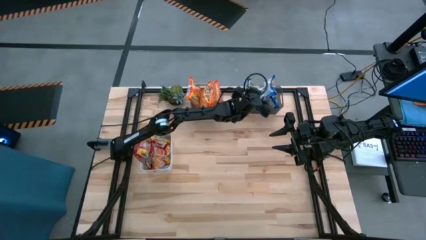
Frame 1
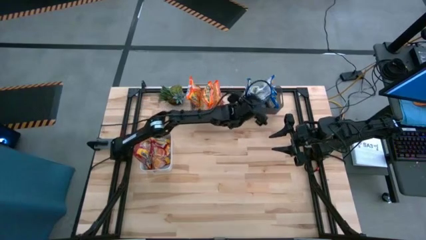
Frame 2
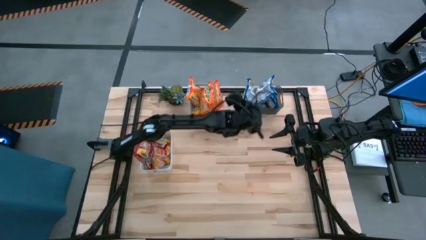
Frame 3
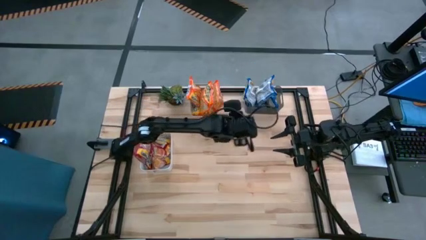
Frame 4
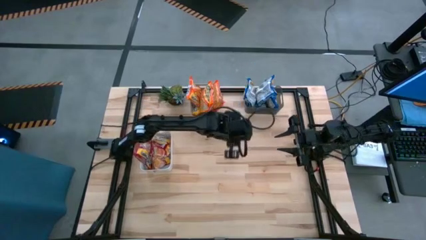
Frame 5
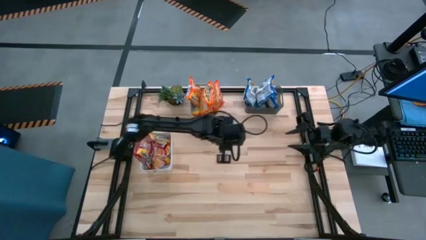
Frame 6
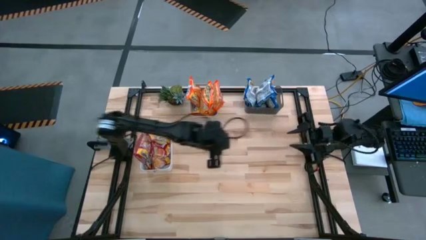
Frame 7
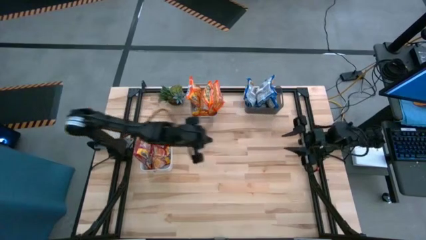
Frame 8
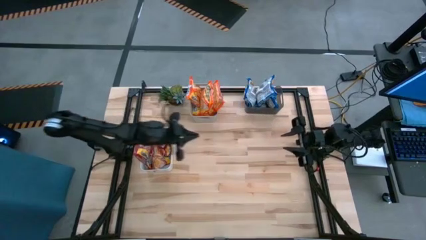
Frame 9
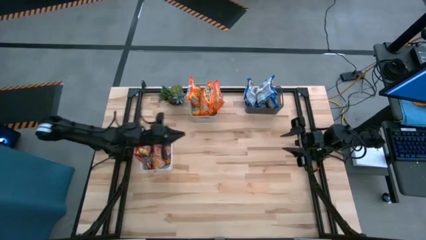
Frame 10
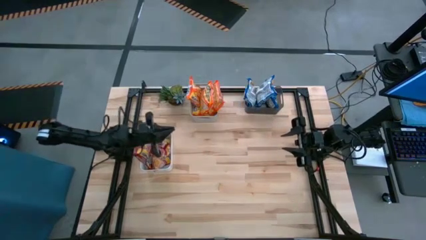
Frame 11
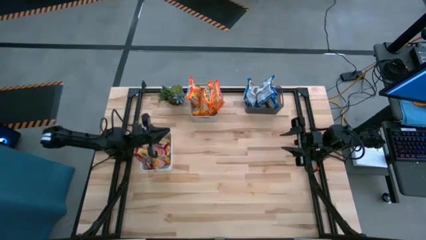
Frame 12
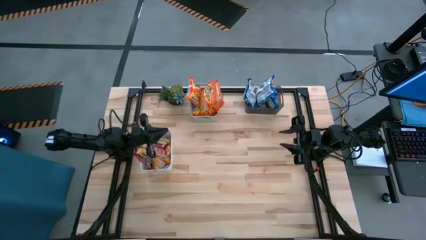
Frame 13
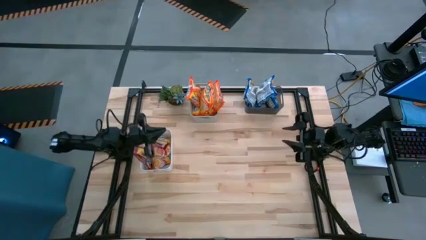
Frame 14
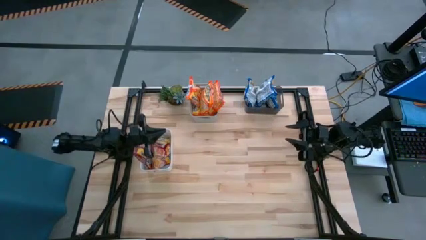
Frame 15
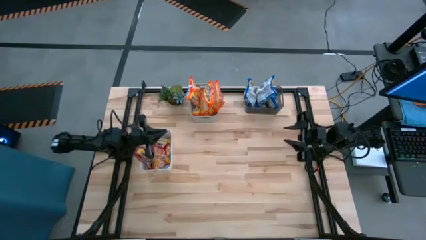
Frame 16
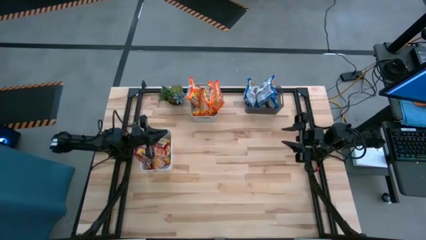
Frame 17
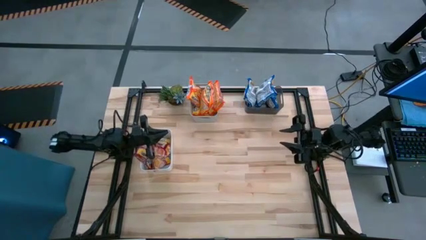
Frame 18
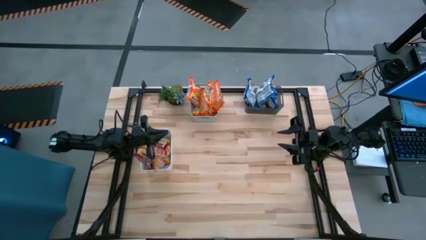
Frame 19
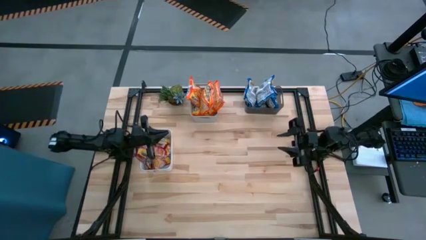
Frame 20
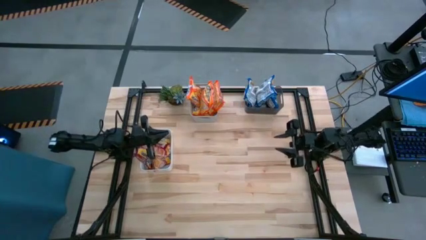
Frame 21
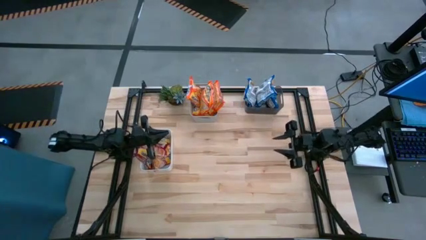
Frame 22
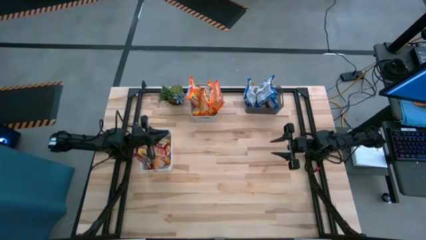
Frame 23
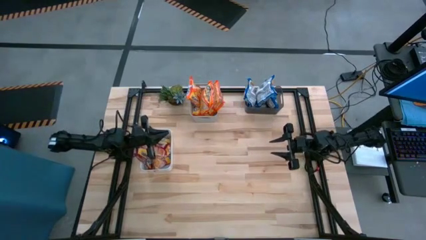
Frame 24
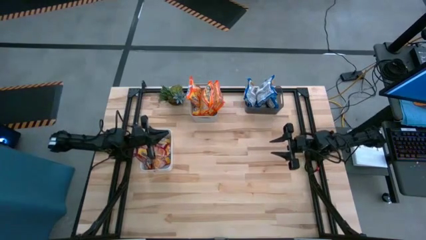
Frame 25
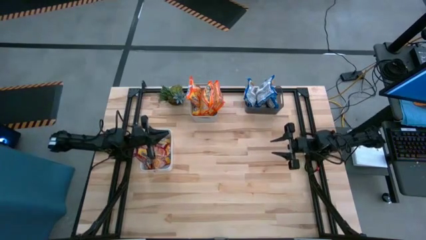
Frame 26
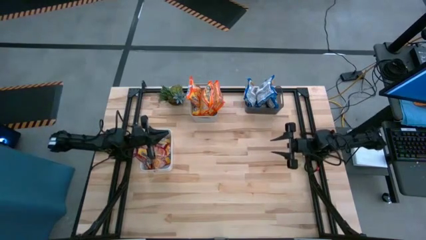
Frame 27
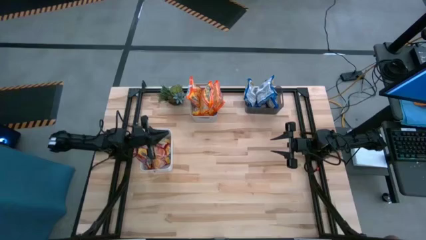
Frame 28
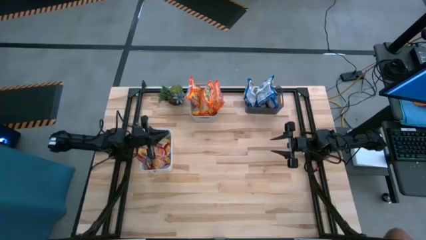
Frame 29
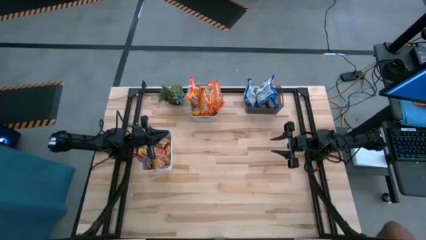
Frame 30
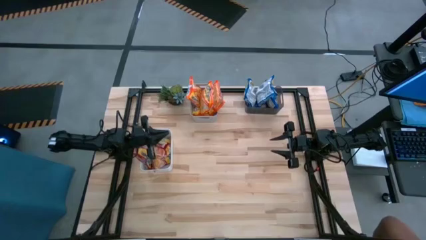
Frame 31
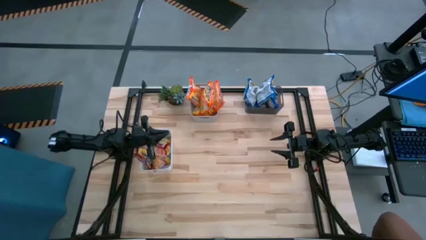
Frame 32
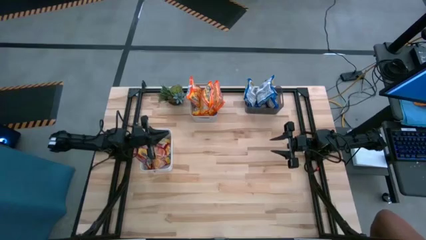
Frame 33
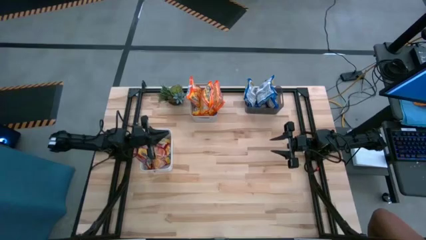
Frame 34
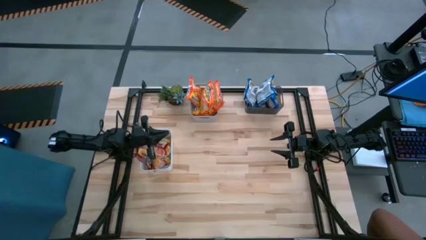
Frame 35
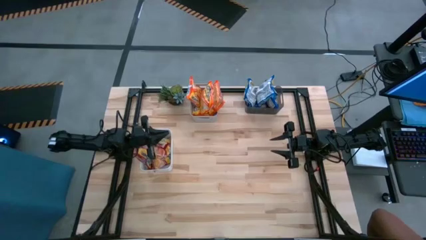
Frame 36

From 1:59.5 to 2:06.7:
Task: Sort Maruchan noodles
Return to Home Position

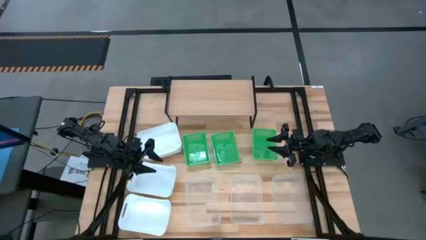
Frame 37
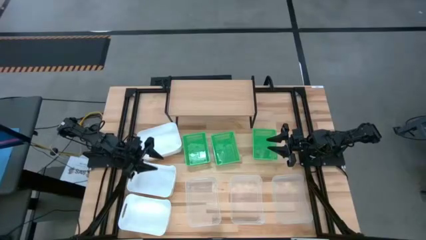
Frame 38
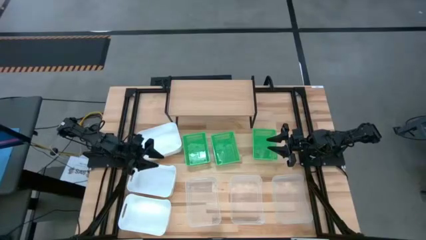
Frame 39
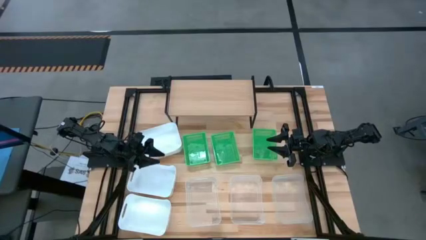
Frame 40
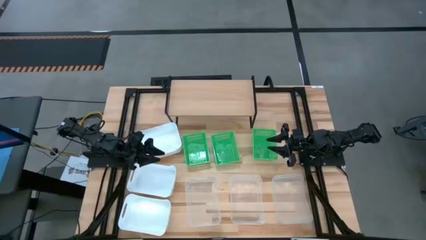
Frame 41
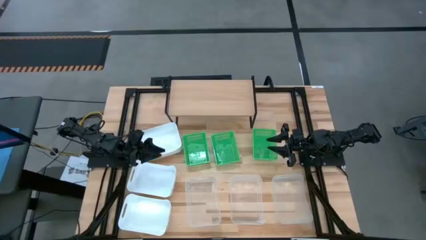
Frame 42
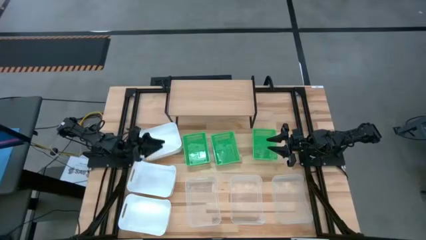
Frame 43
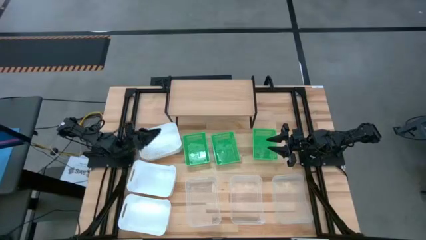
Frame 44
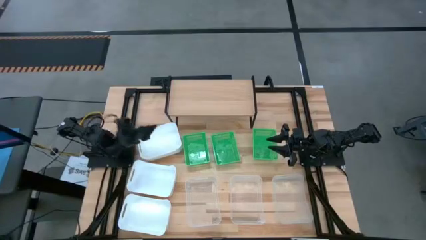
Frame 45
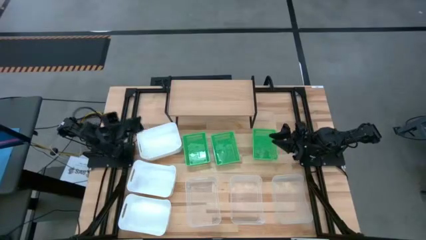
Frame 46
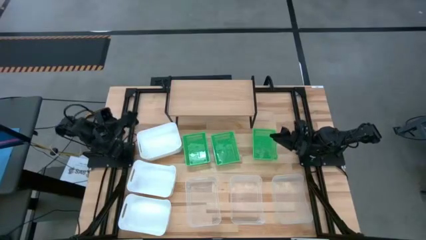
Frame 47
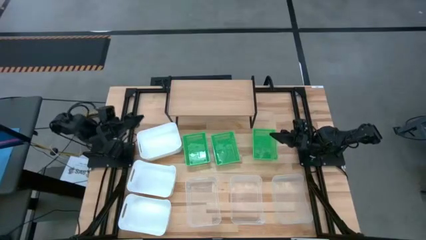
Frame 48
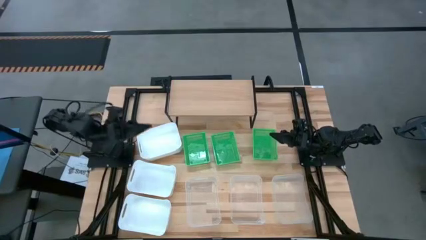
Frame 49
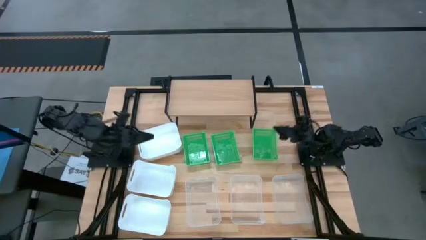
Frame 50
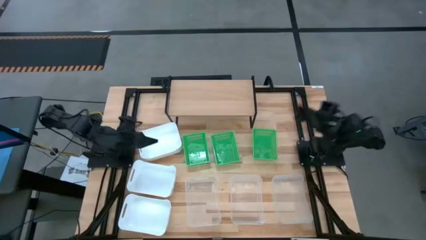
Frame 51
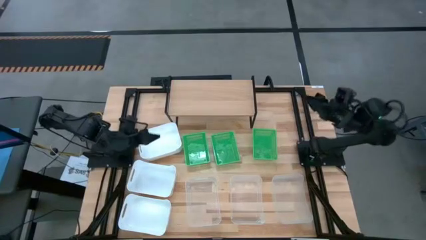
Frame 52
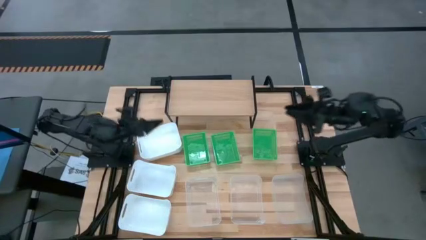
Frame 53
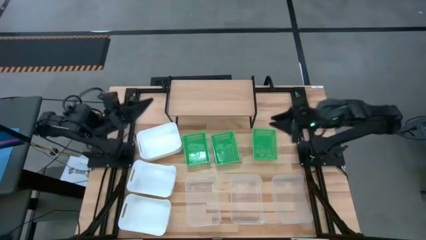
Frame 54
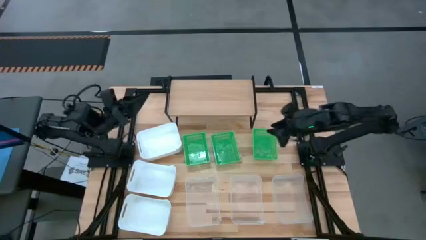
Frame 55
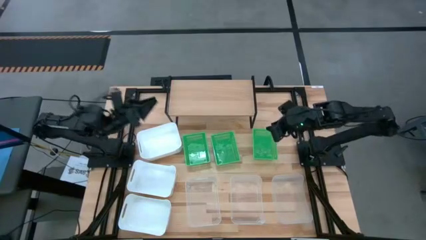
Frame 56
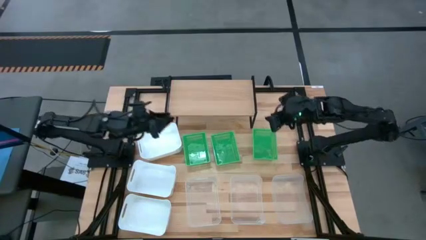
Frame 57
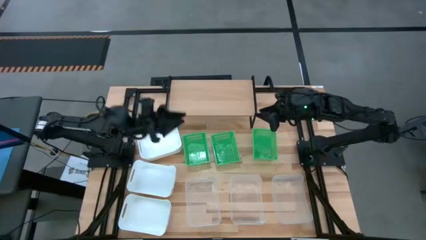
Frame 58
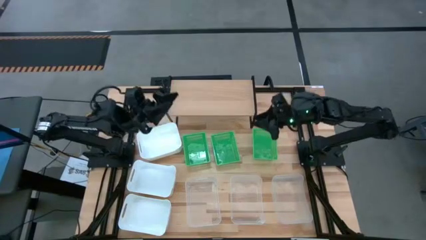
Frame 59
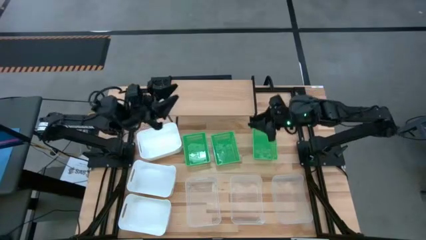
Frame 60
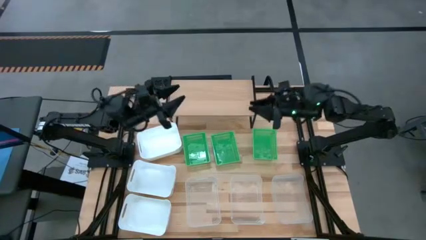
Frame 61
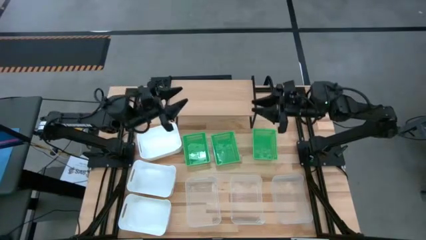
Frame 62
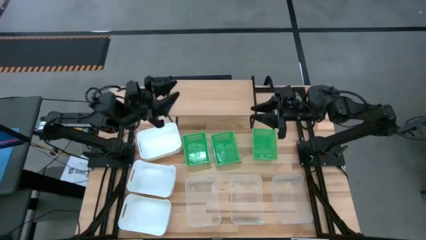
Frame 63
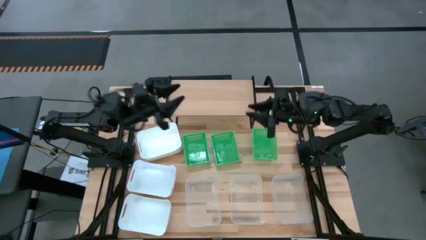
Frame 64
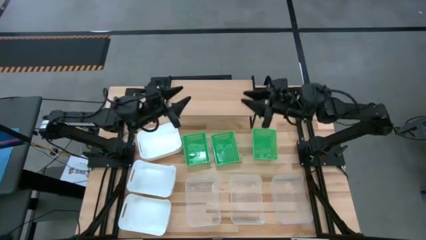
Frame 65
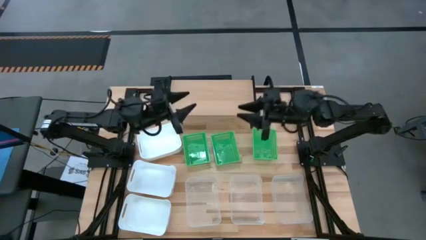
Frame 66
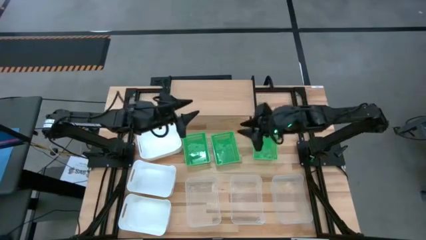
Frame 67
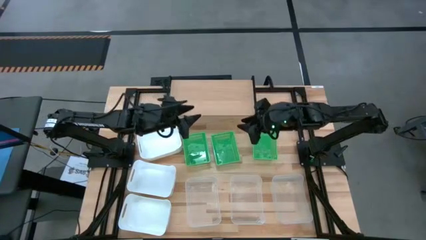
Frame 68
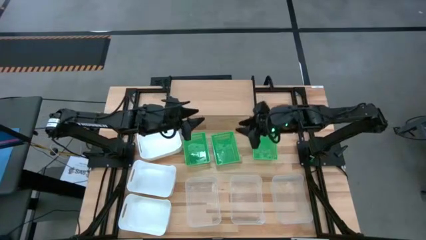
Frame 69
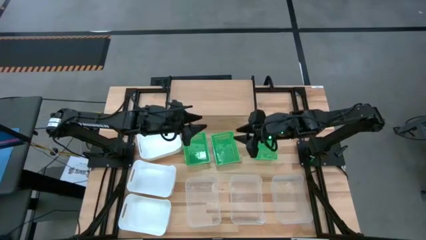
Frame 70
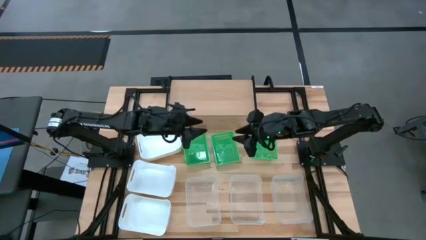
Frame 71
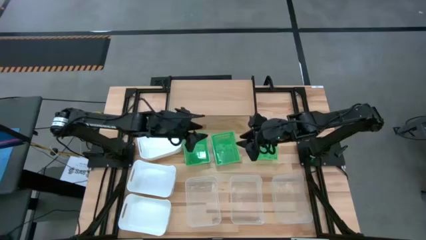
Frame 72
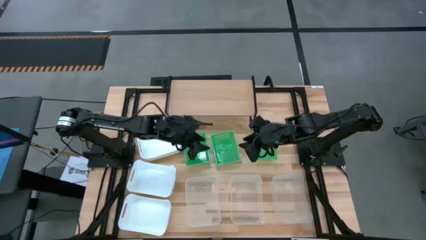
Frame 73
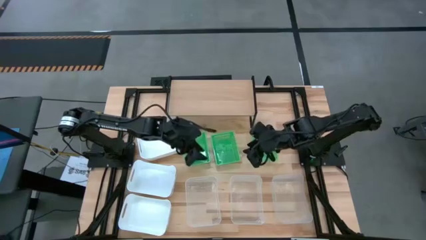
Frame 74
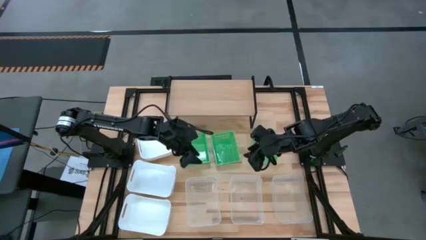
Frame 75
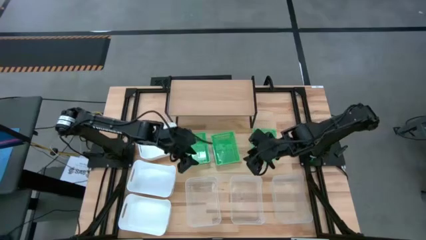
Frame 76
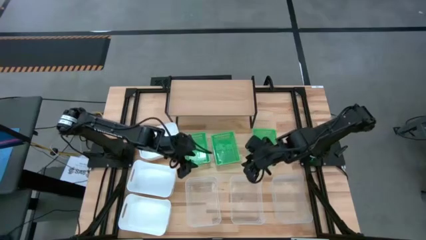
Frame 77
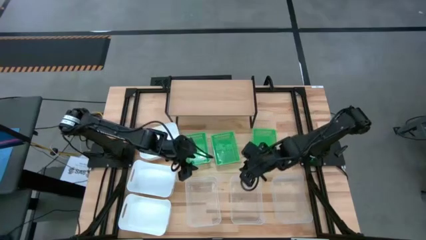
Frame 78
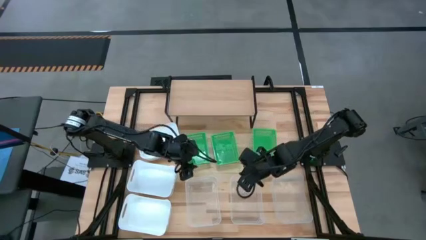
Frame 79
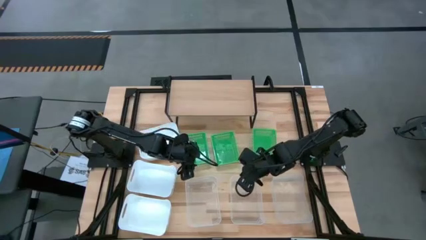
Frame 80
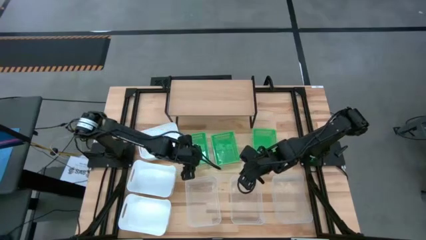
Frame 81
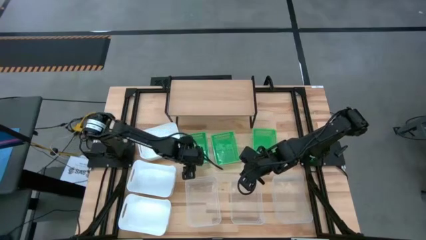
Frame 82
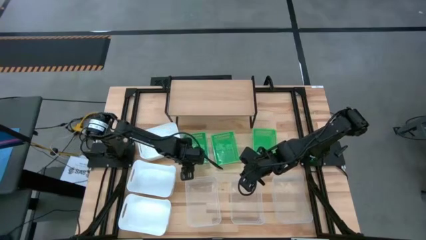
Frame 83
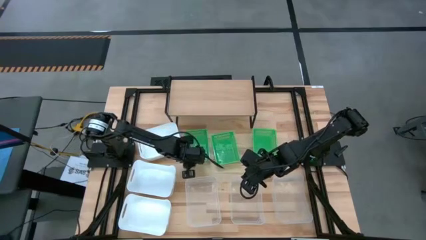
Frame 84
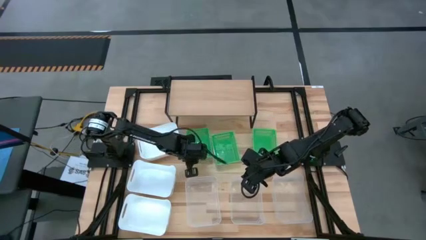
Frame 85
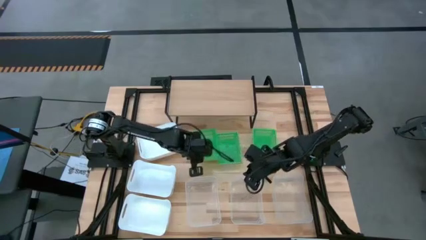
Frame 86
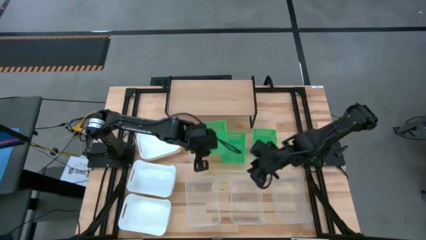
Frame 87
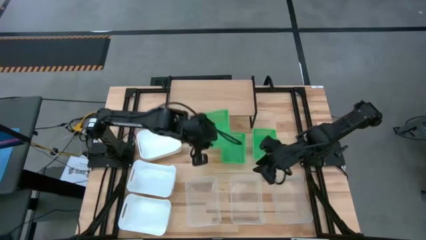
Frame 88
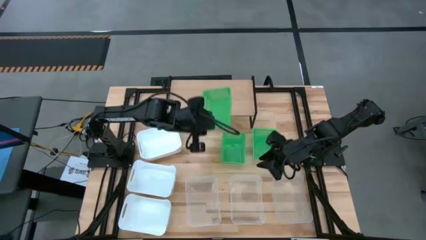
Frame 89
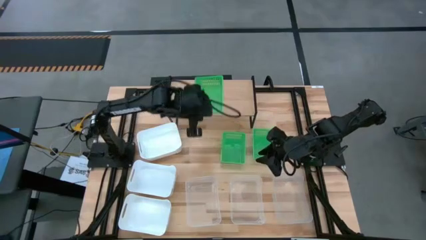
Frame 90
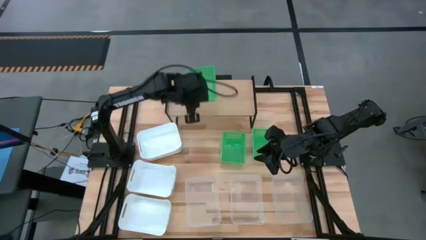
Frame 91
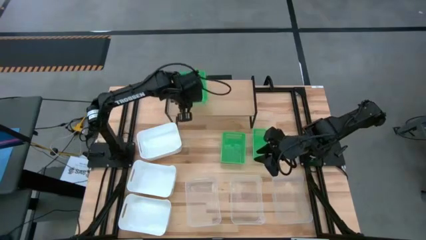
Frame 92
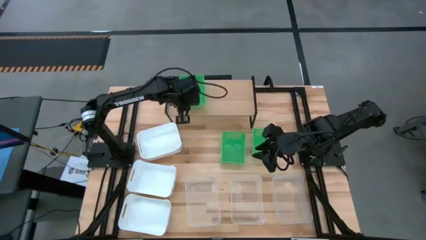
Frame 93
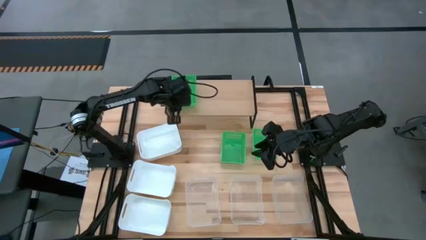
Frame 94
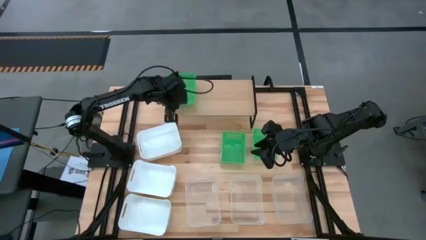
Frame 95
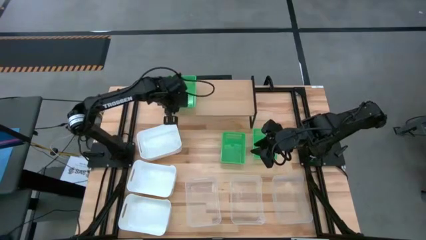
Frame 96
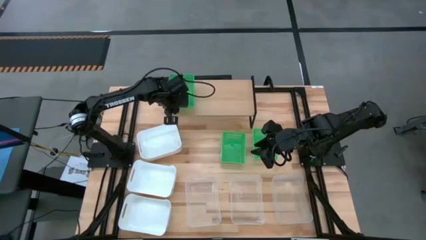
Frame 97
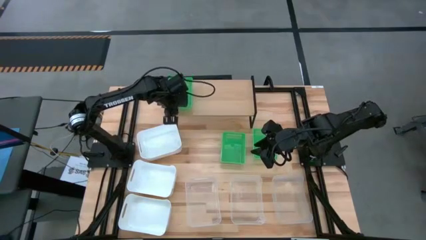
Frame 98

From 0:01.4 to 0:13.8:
Task: Stack baskets on shelf by color
Put the left green bin on the shelf
